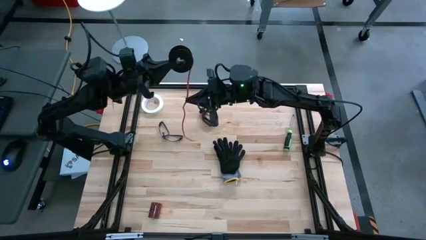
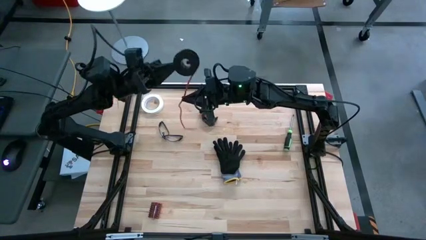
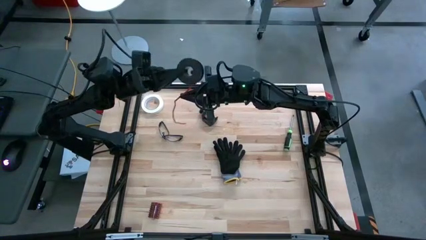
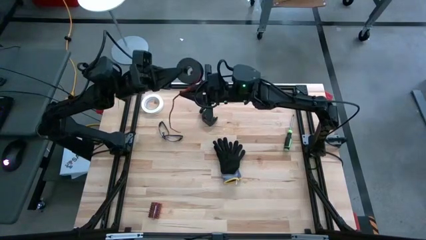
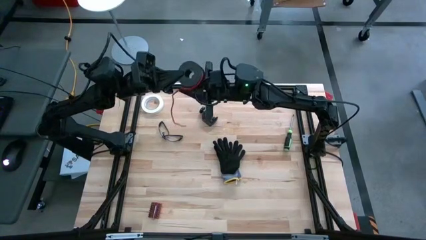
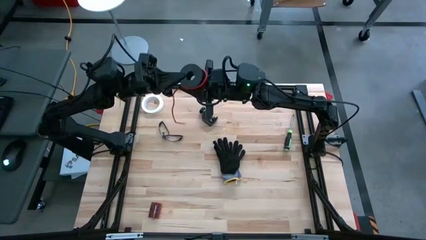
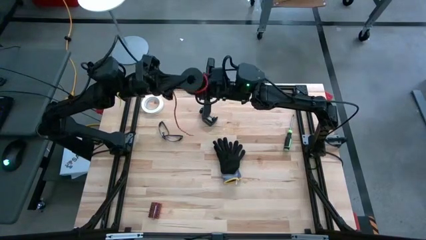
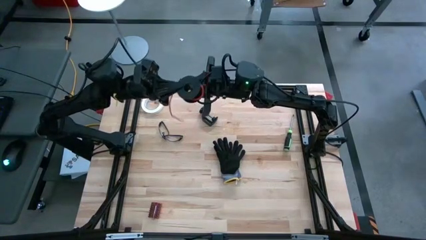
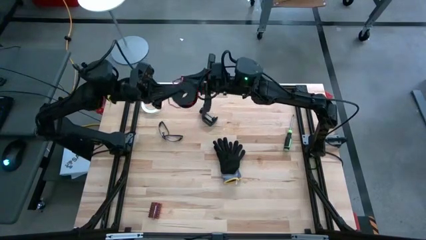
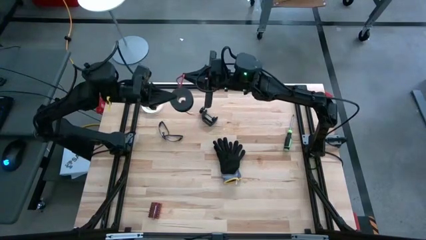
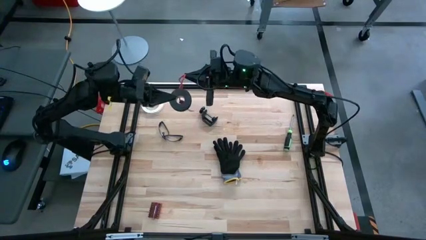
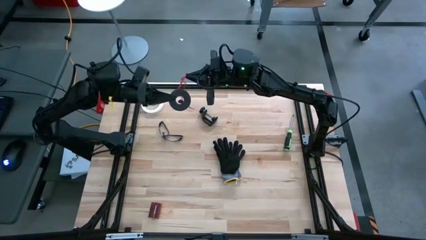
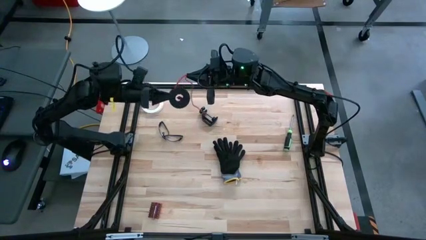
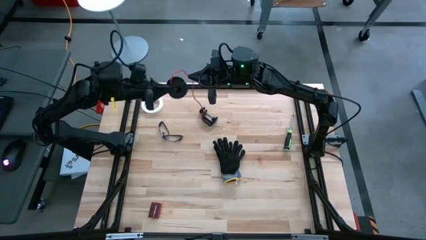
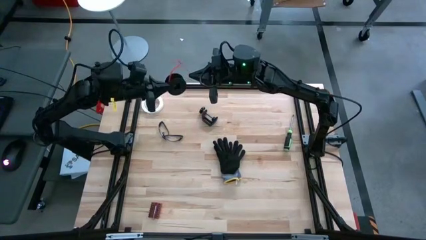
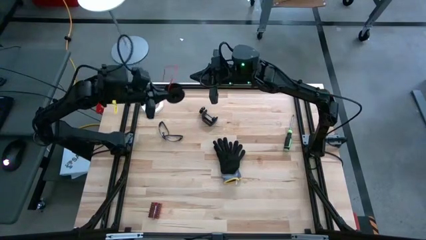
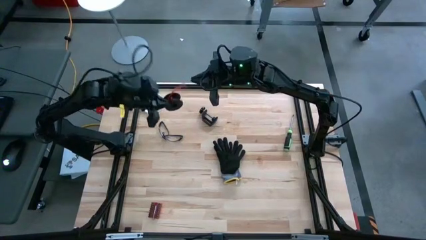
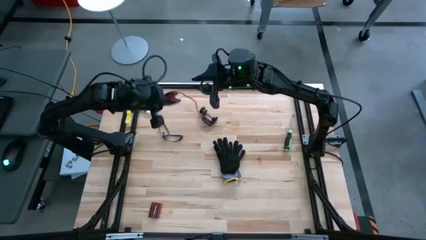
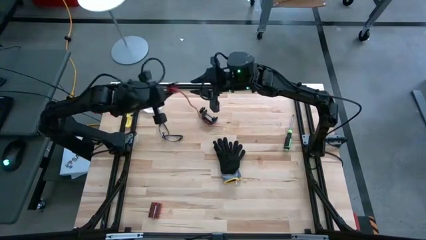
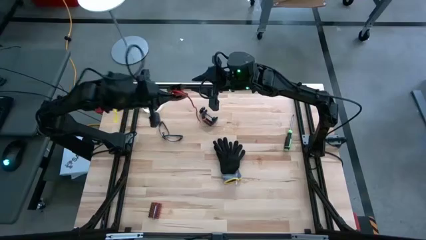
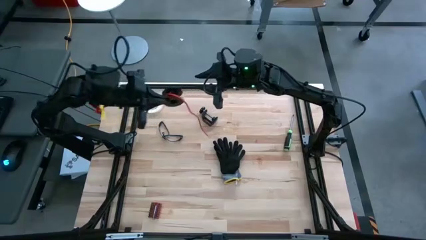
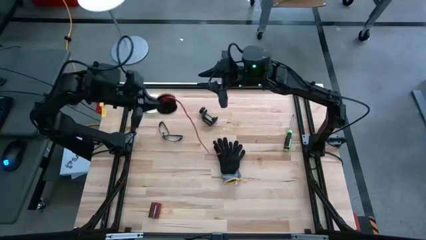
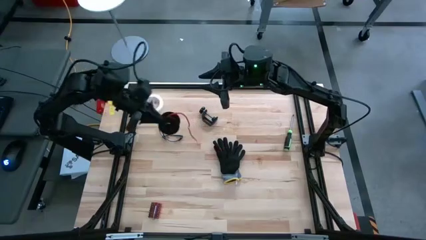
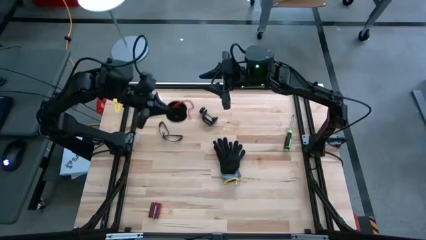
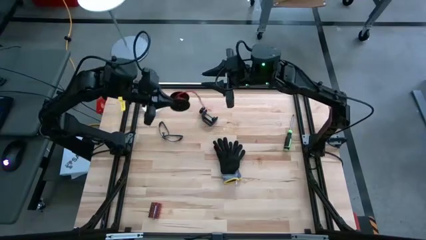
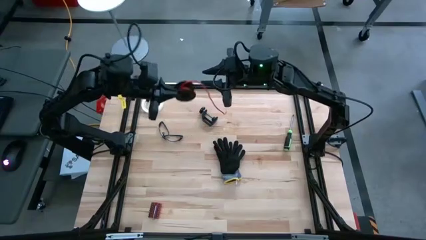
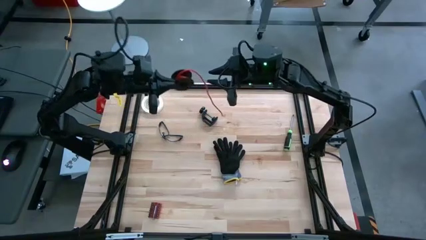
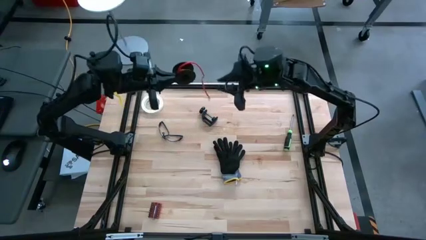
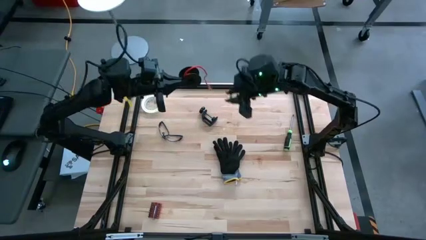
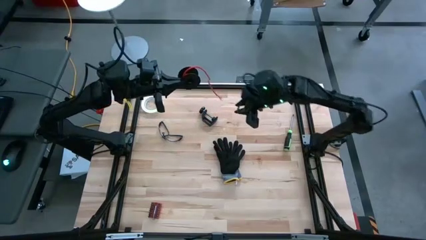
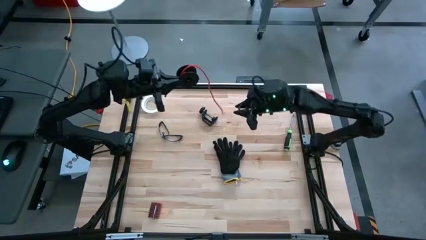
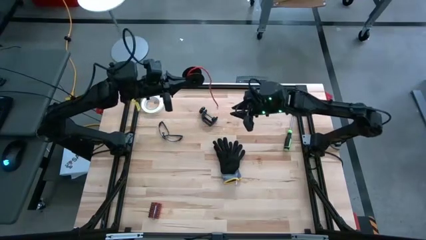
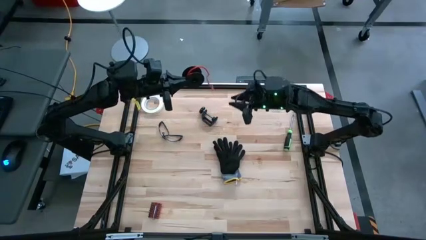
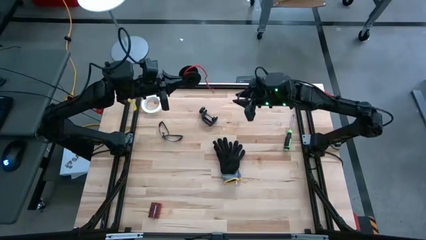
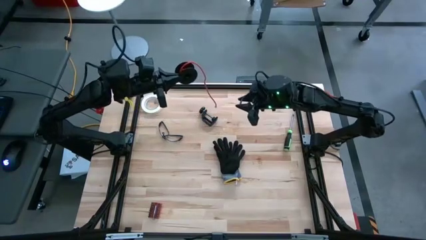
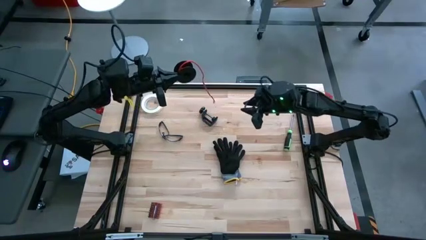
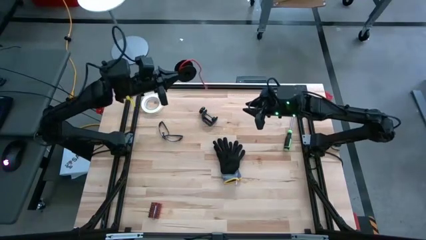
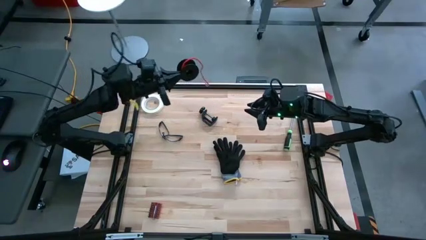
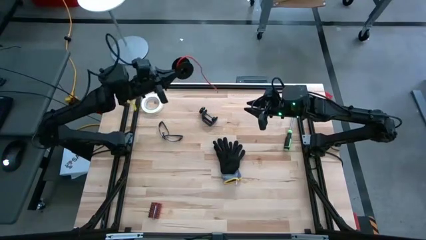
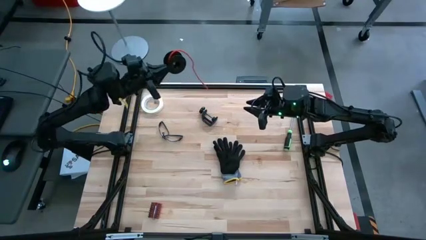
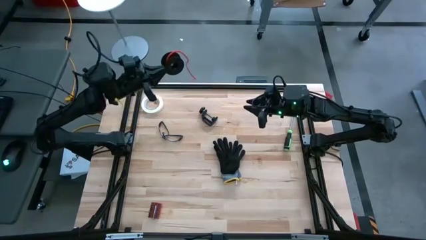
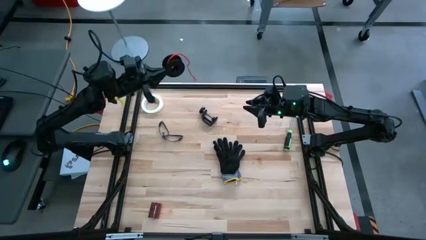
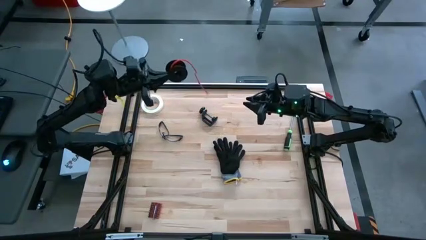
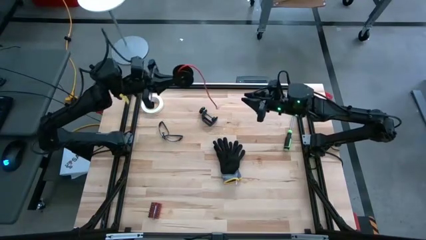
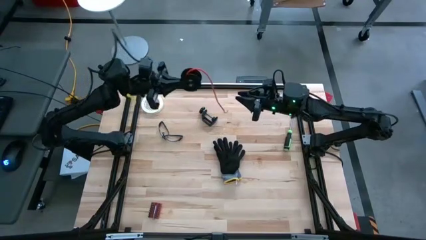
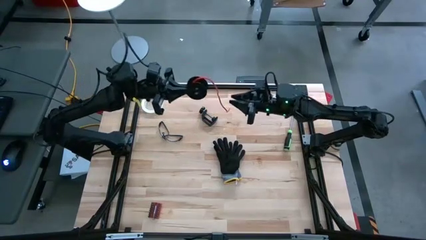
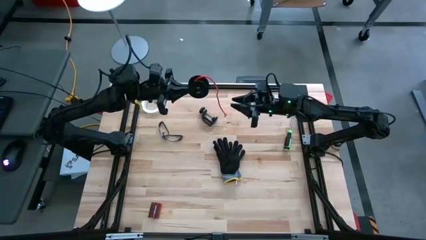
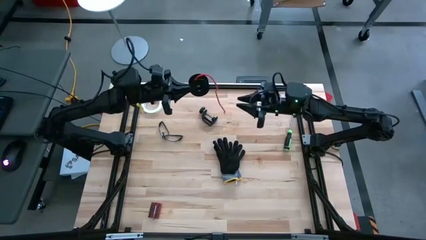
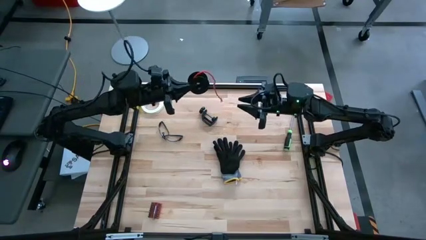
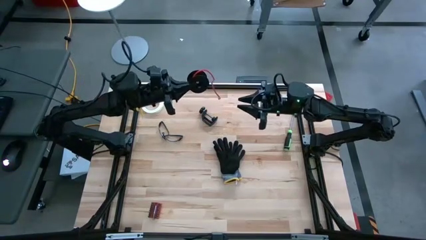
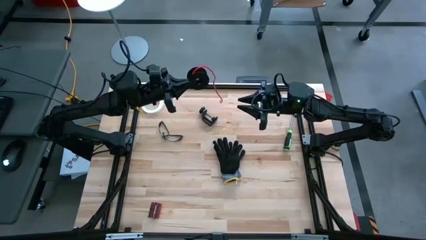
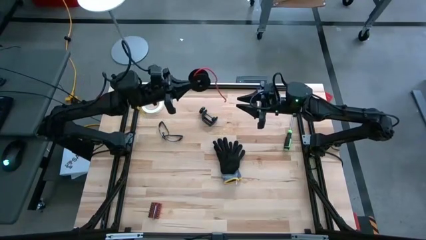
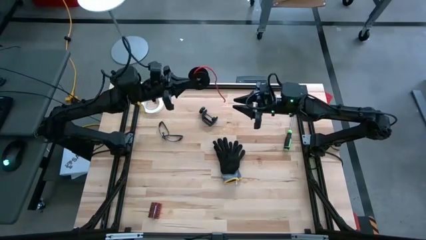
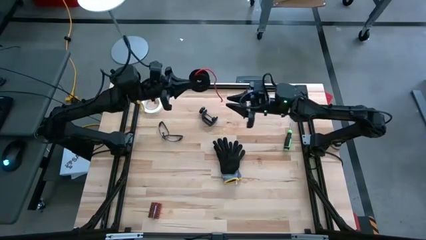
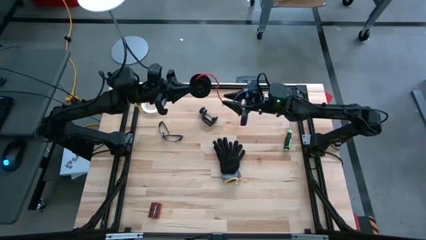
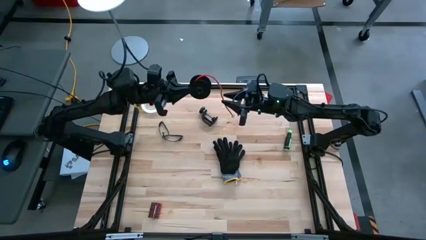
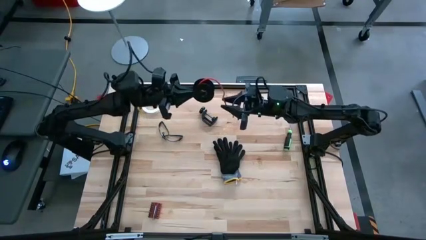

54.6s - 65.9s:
Task: Coil cords
Coil the orange wire onto the spool

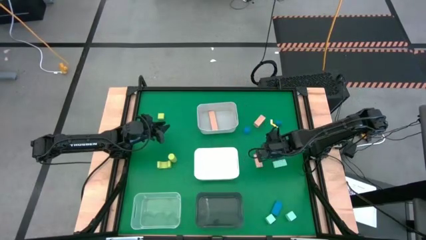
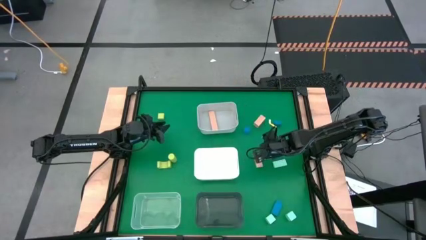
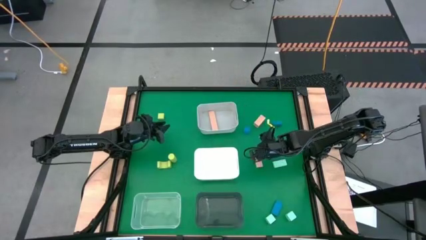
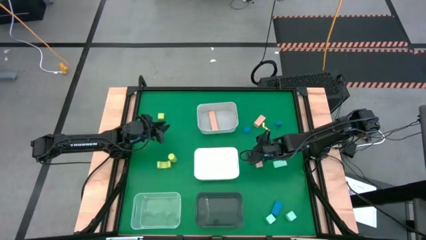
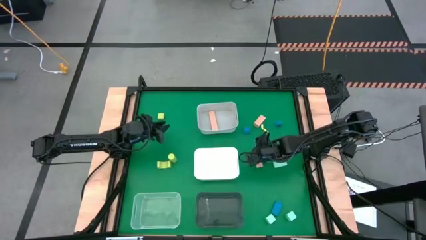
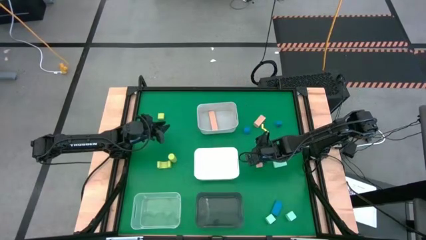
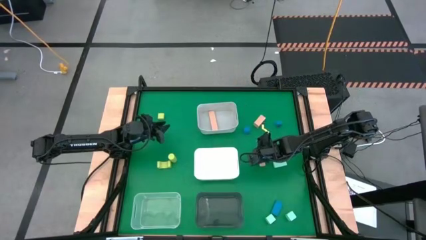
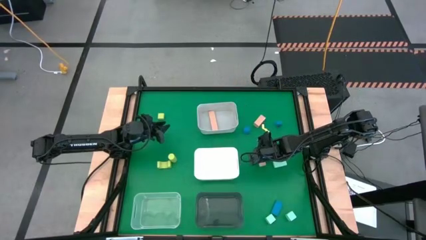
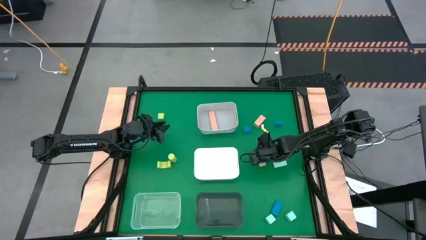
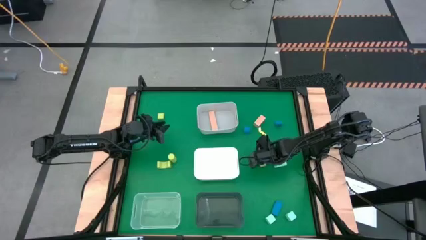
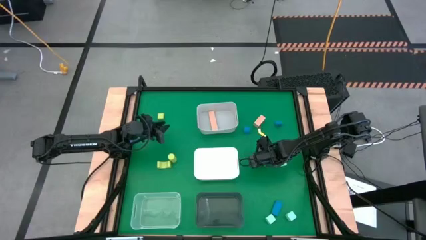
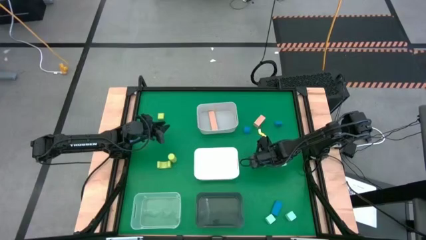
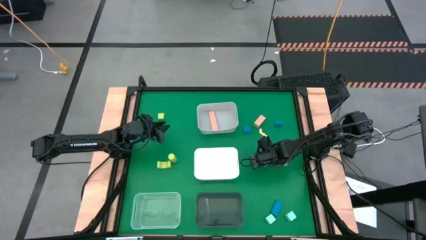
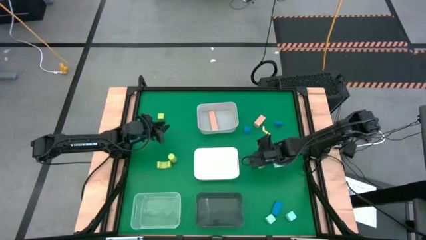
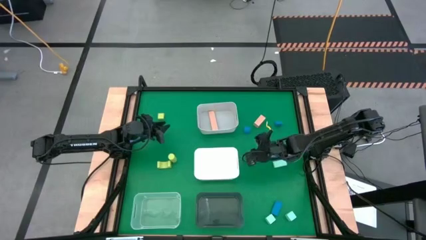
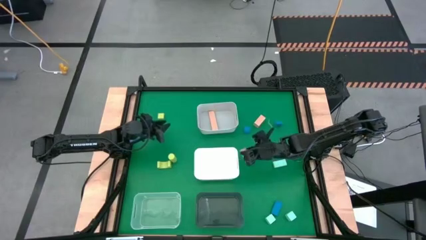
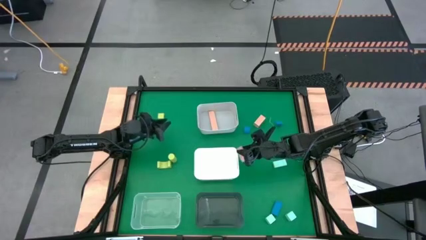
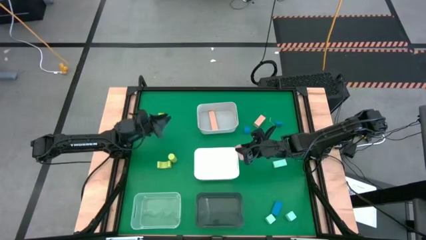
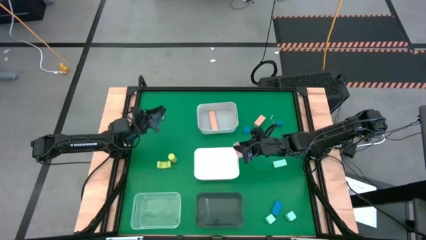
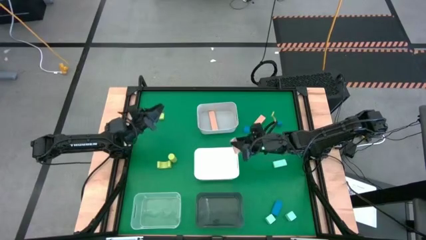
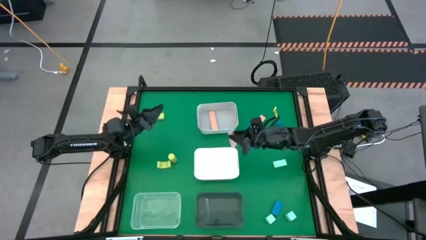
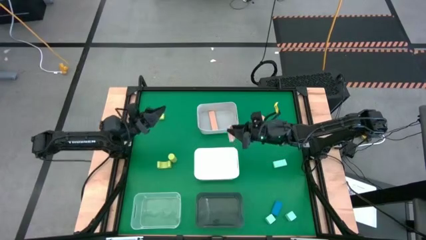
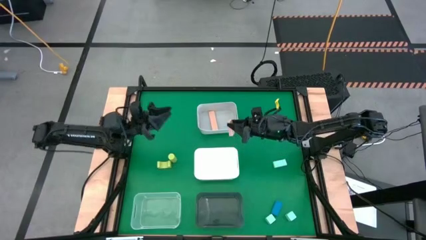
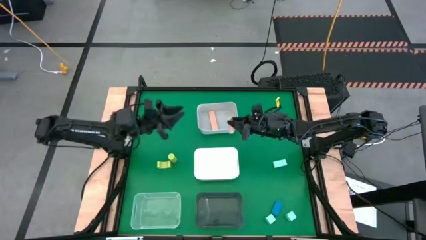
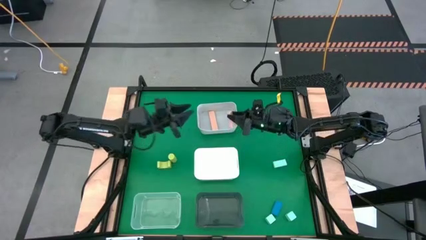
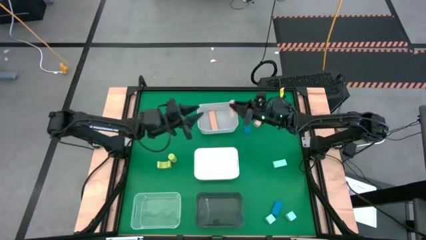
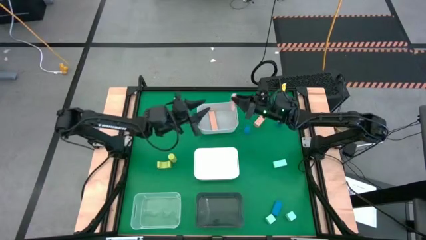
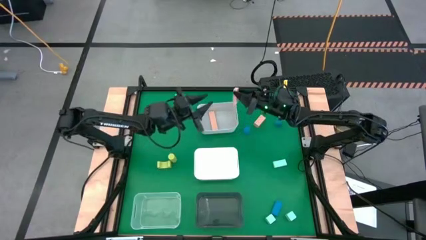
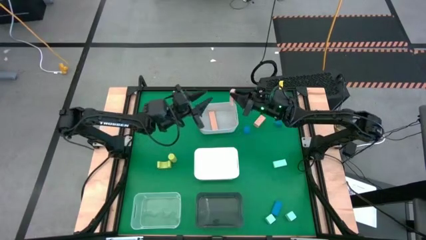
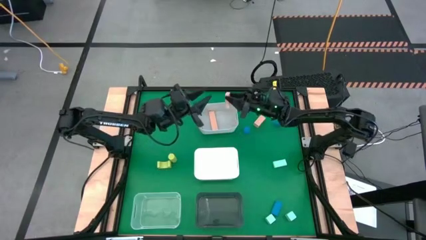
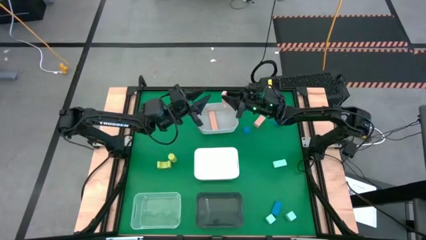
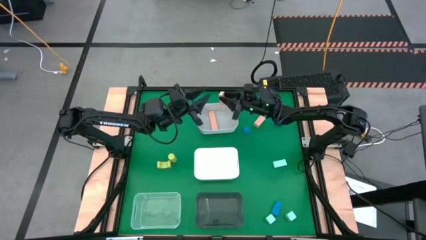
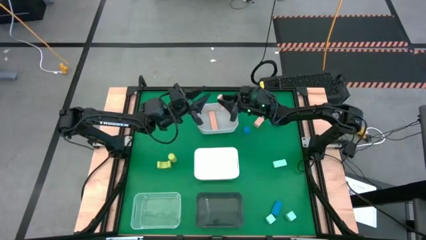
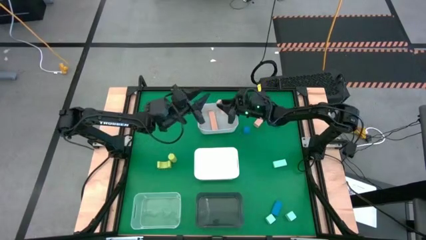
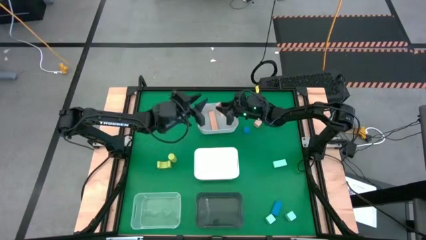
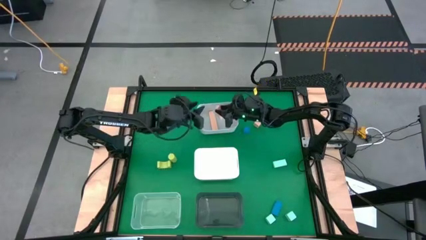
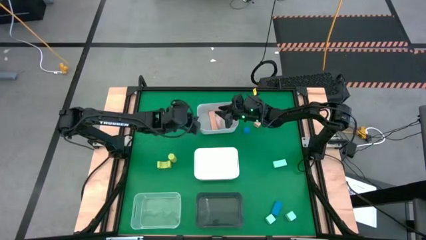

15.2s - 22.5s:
Task: Sort & place blocks by color
Put the bottom brown block into the gray bin
